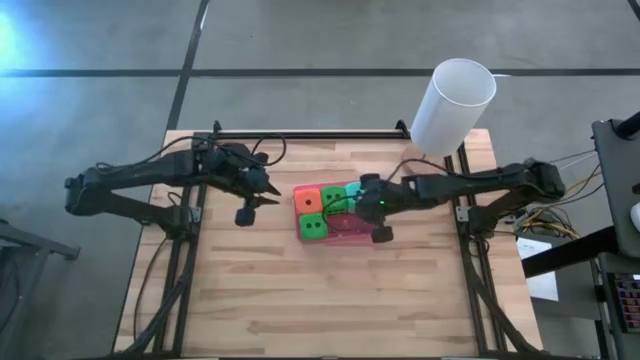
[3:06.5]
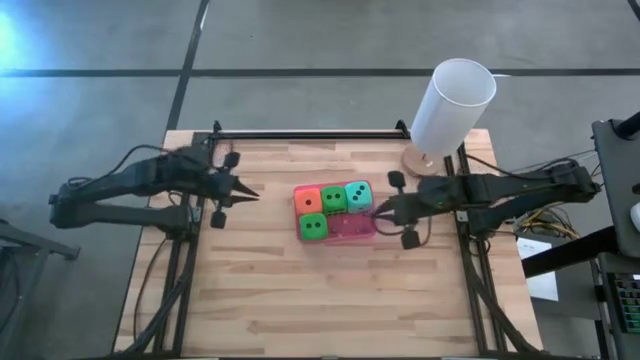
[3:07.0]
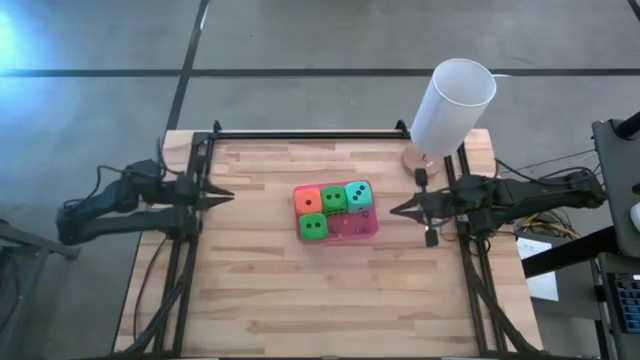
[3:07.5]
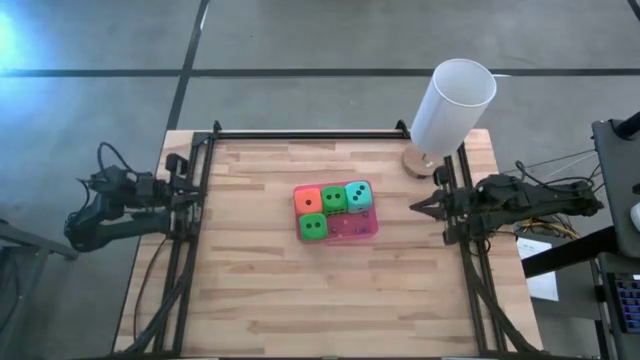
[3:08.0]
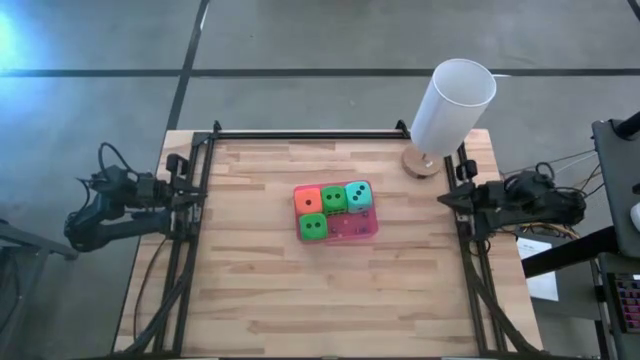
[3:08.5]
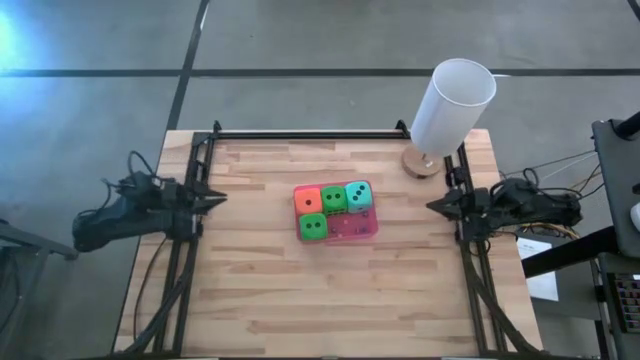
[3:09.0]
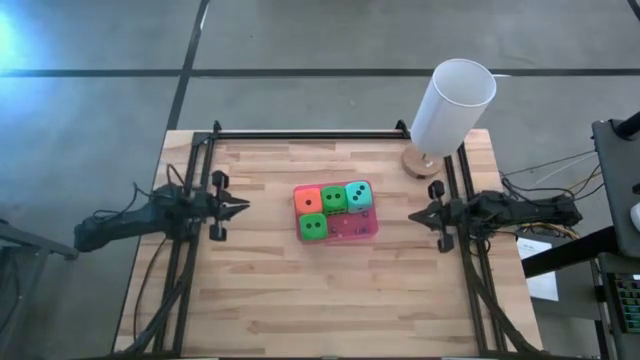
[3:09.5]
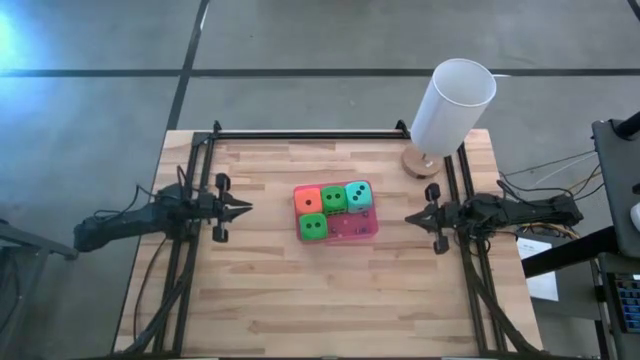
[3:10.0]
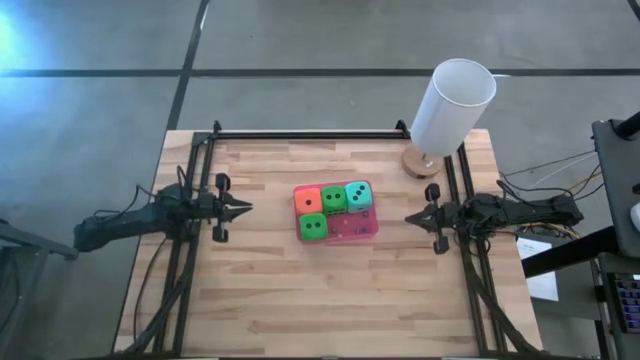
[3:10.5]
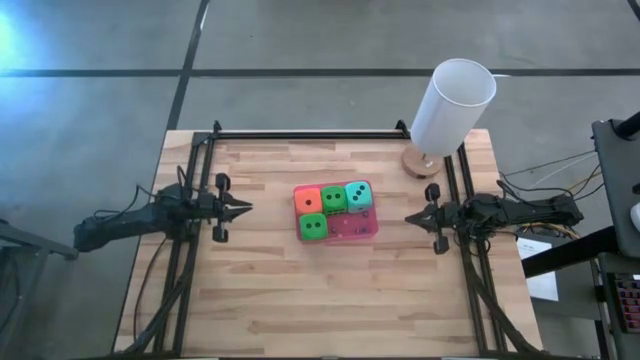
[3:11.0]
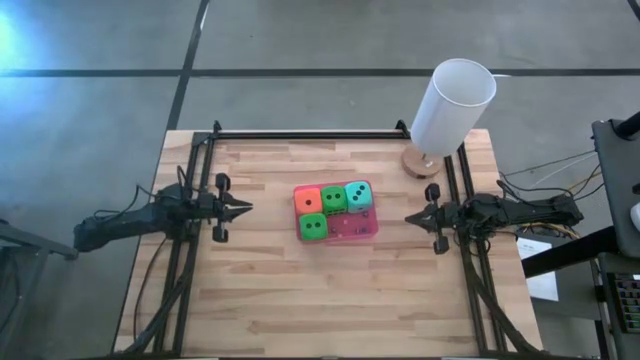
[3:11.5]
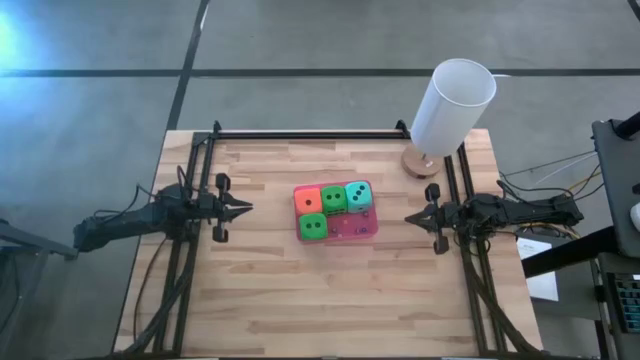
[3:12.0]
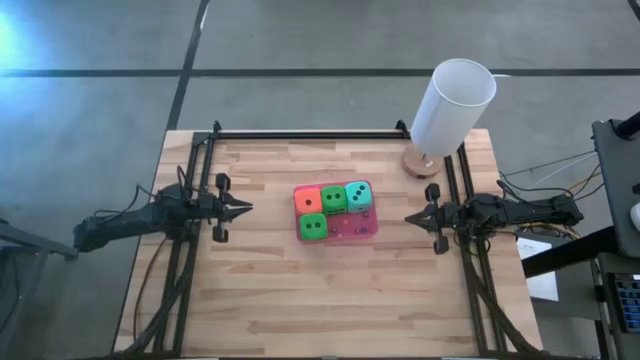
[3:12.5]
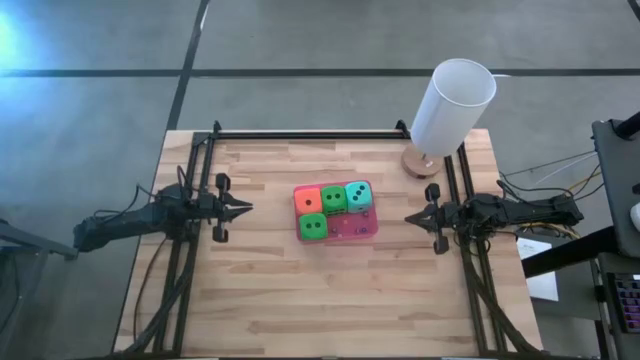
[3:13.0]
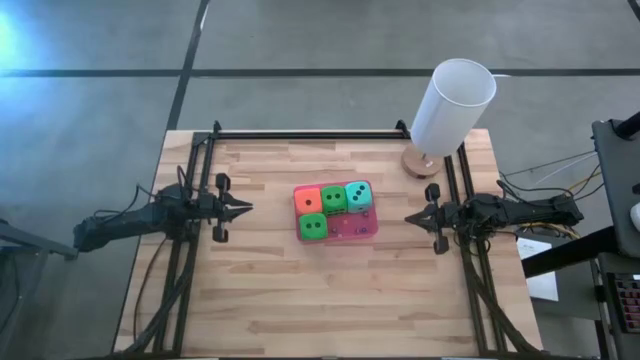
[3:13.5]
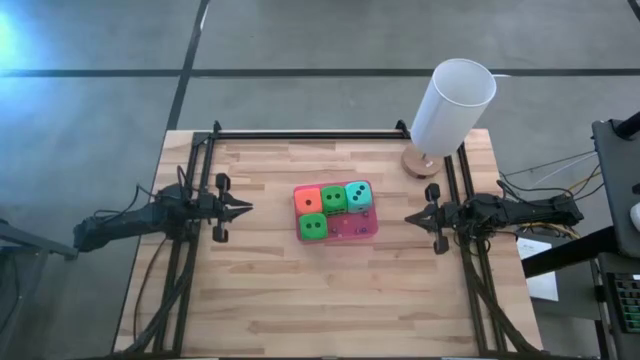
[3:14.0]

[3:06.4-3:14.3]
Task: Pick & Place Dice
Return to Home Position

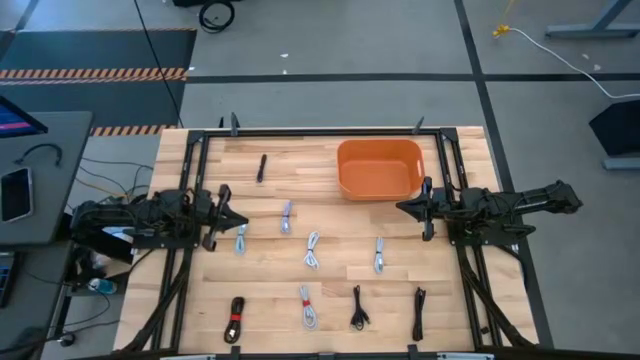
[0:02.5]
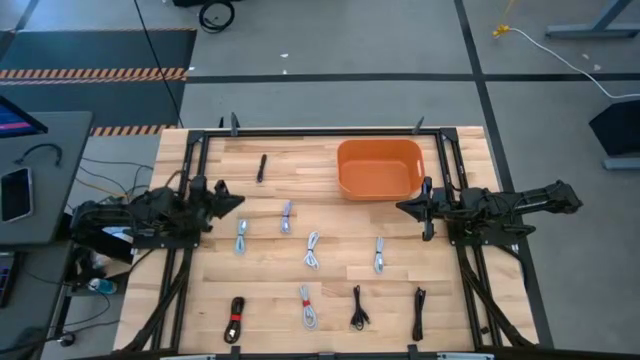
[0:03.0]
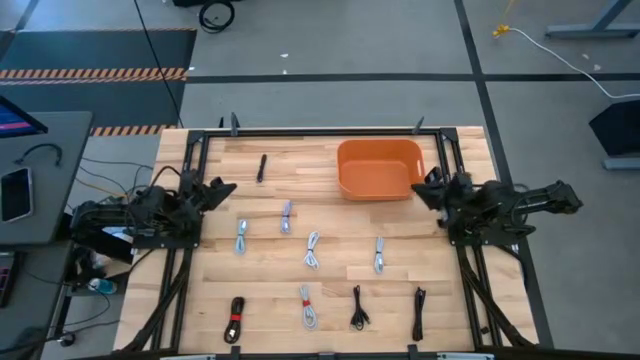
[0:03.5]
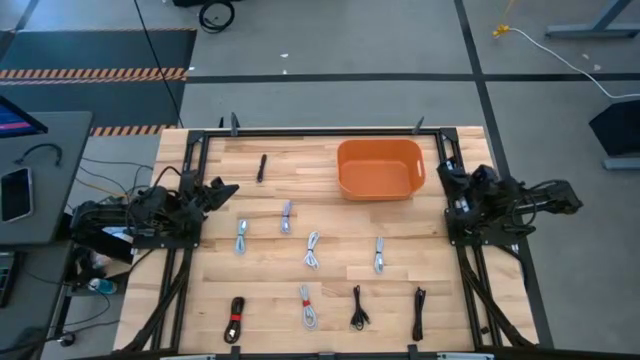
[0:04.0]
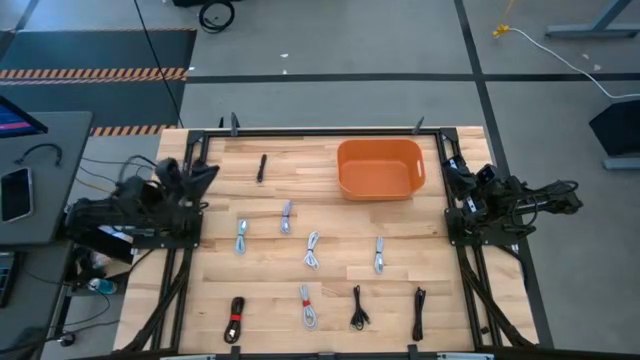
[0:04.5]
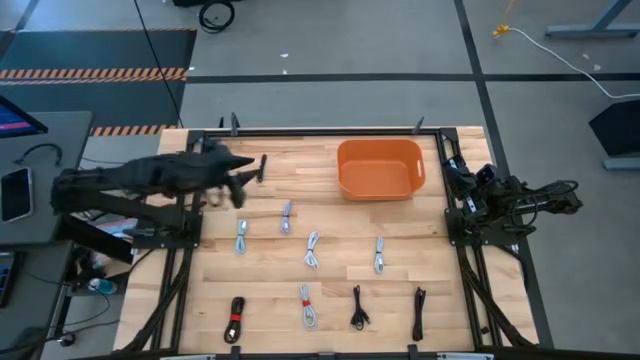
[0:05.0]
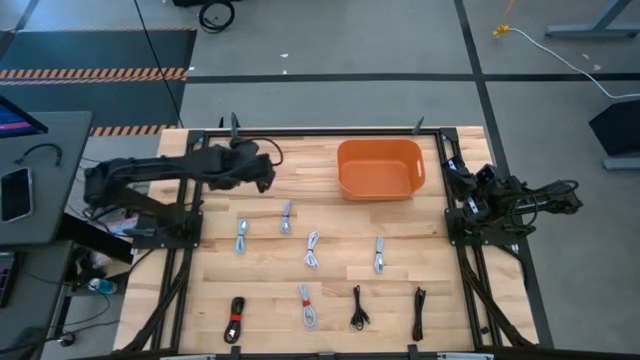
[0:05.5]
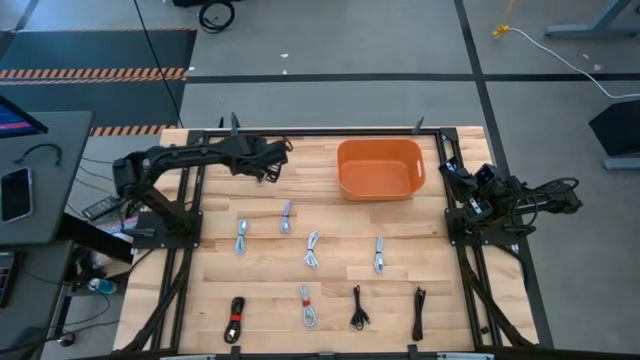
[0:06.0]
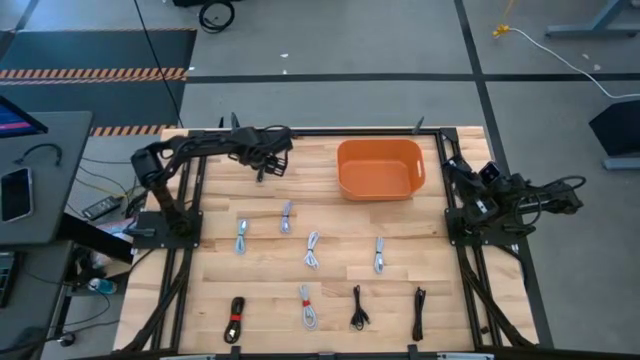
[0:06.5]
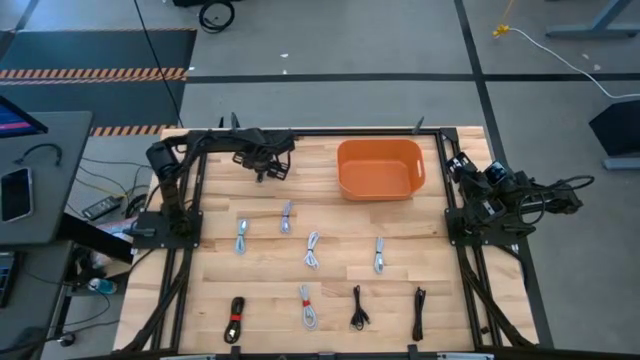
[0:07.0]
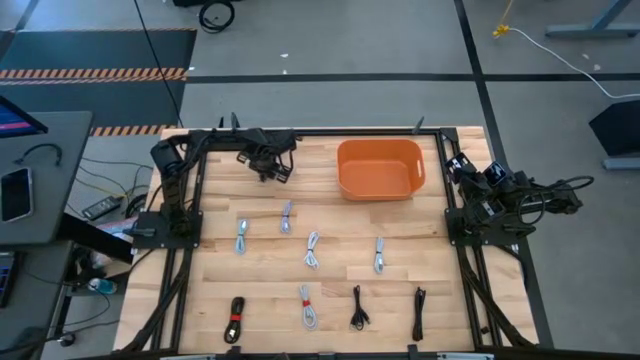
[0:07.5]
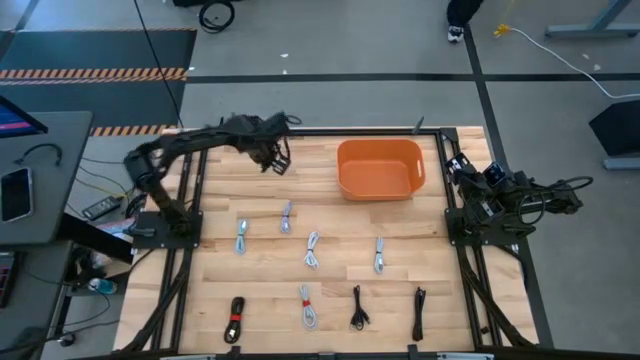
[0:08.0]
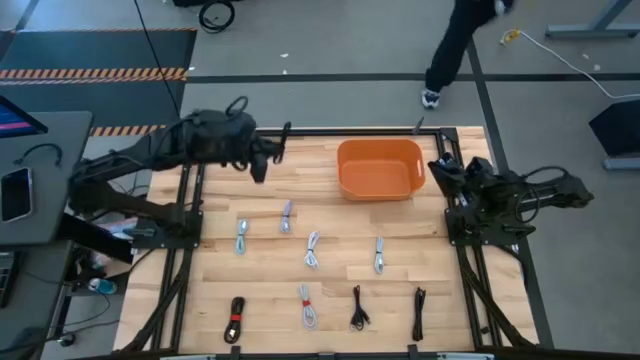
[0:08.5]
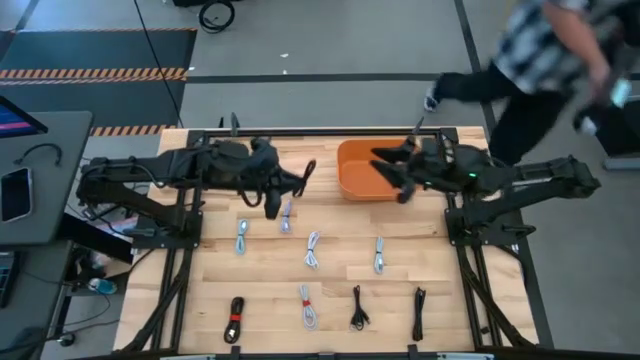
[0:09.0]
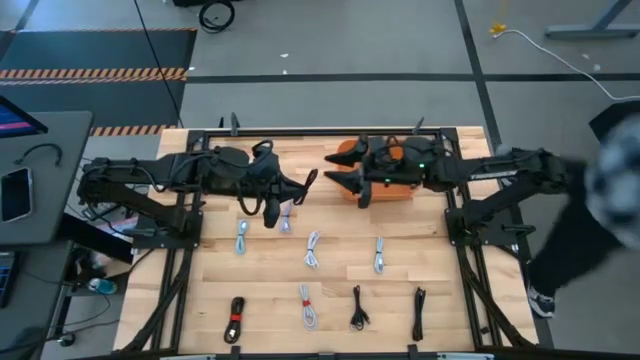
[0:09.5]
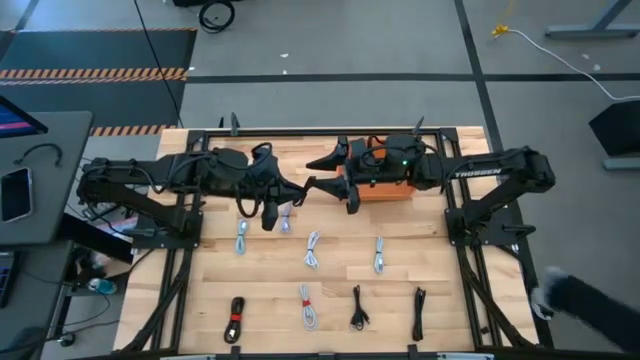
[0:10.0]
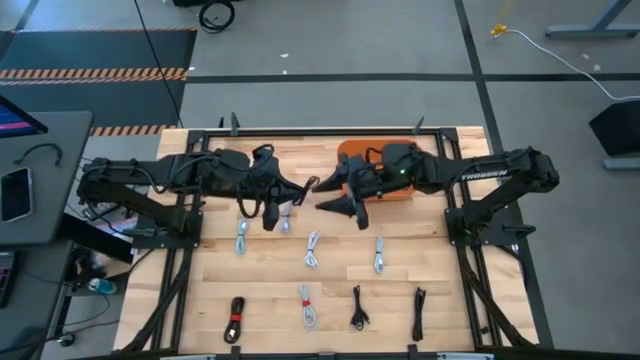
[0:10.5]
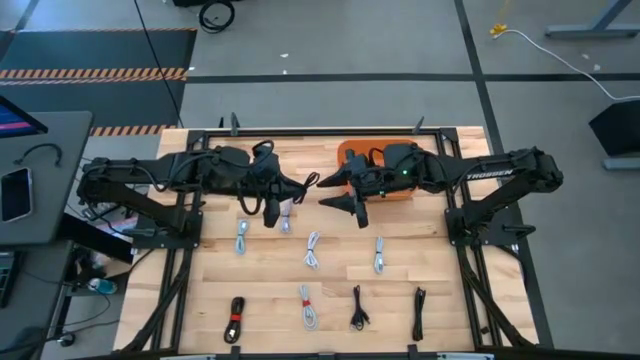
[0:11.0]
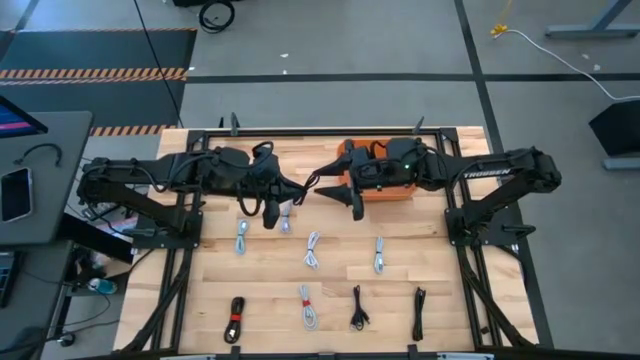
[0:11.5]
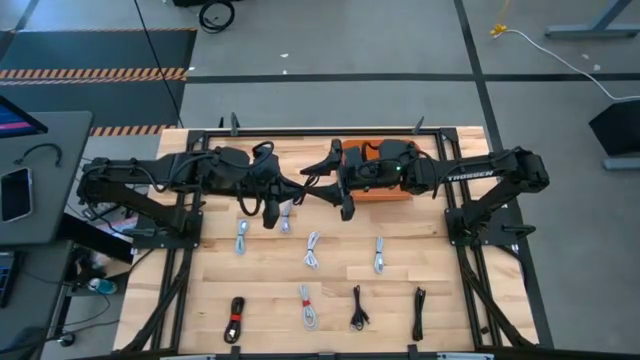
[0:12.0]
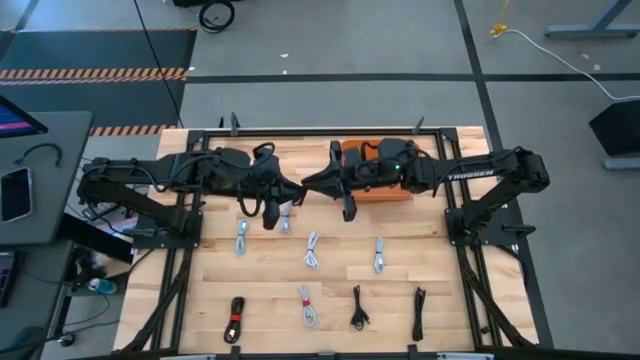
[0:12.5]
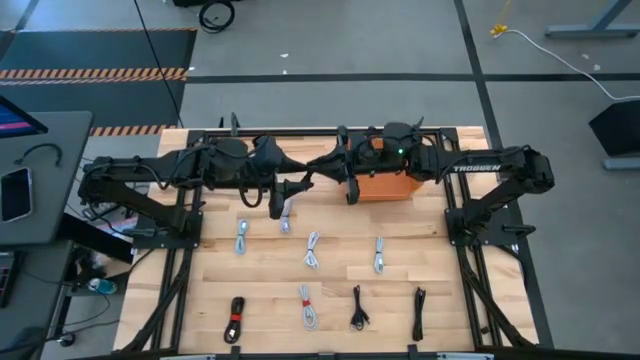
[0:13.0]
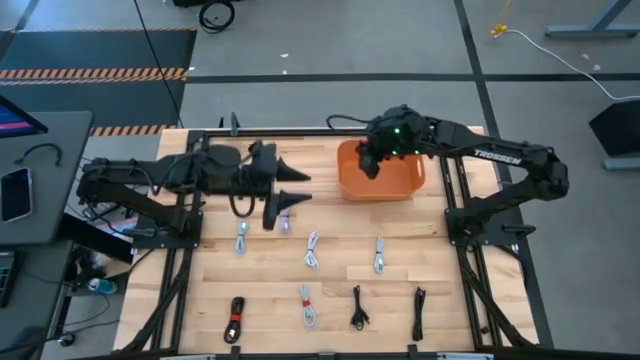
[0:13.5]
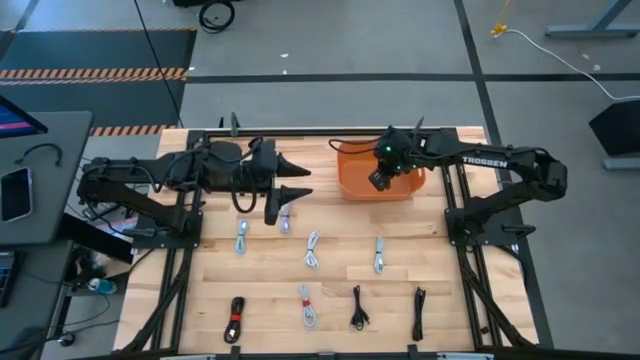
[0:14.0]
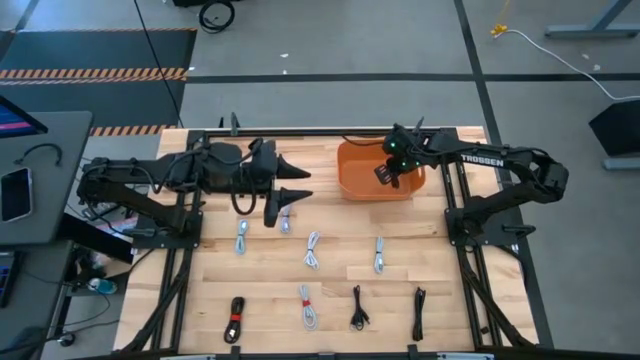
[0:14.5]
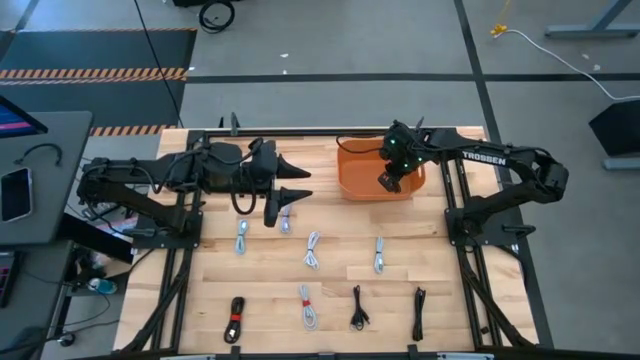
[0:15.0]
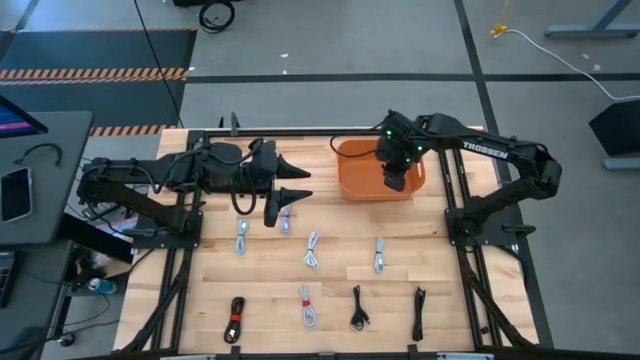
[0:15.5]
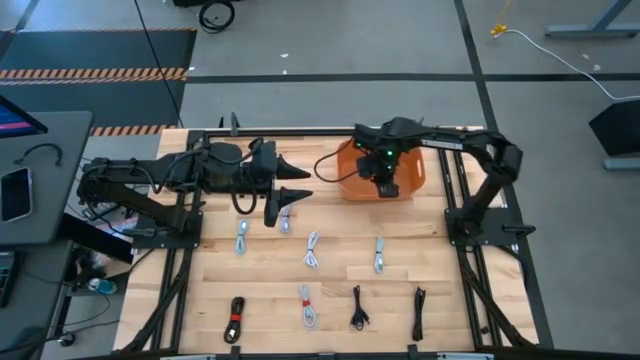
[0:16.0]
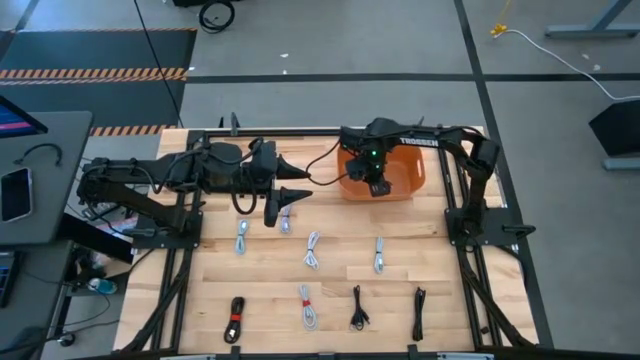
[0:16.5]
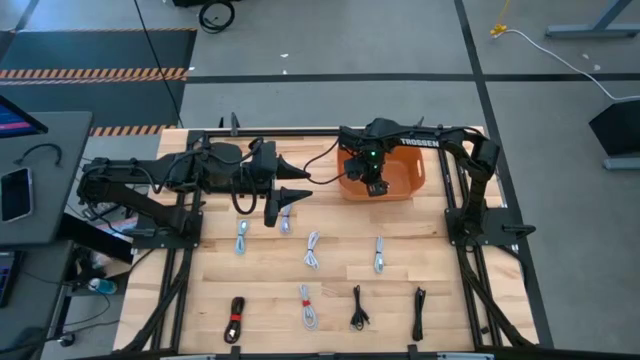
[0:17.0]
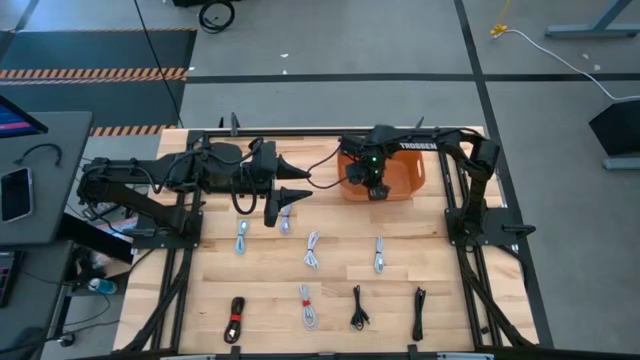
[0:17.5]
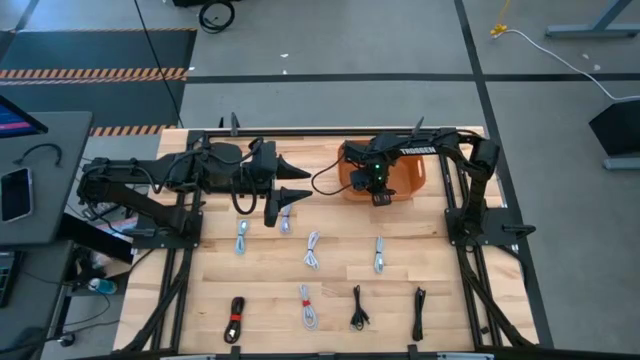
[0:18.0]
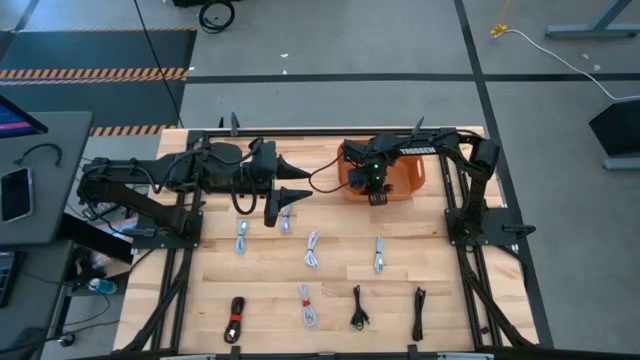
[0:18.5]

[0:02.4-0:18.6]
Task: Pick and place USB-C Cables
Put the black USB cable into the orange bin
